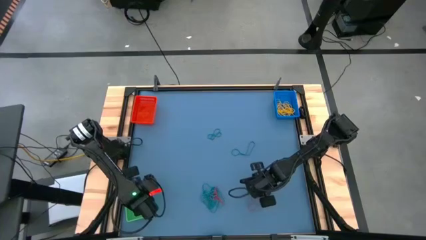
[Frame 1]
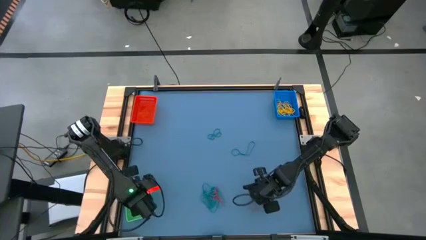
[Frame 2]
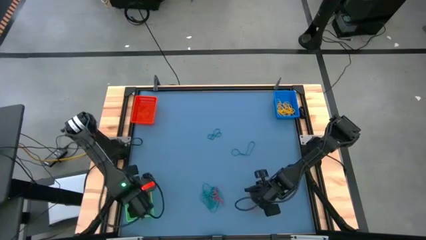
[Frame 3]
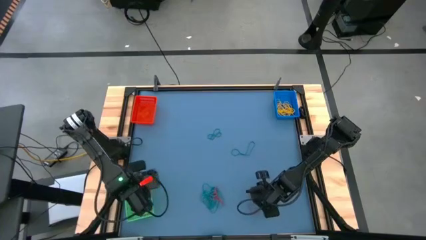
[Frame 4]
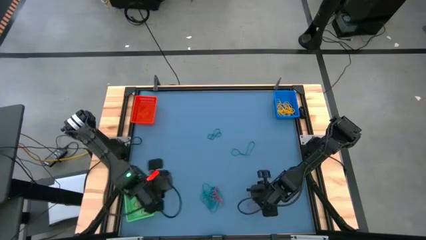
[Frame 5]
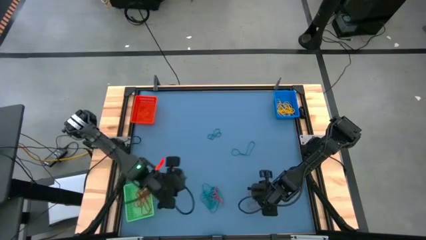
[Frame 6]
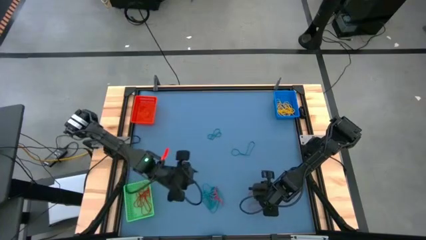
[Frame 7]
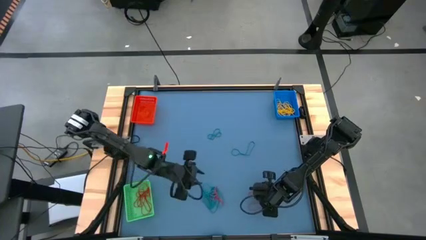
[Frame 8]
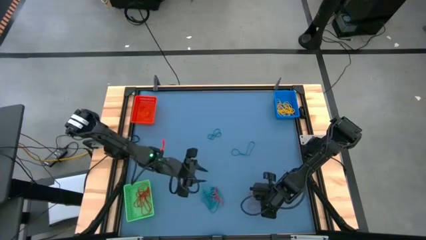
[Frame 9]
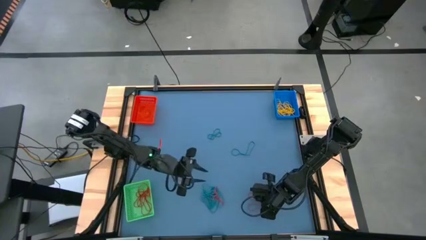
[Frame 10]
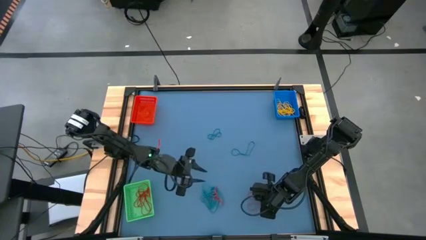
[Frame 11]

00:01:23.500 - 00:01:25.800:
Task: Sort rubber bands into baskets
Put the red rubber band into the green basket

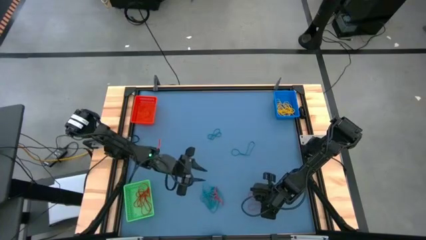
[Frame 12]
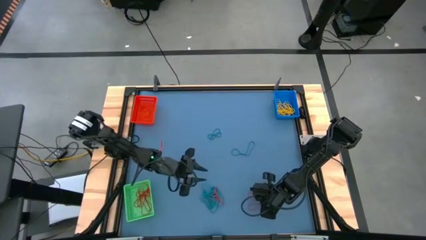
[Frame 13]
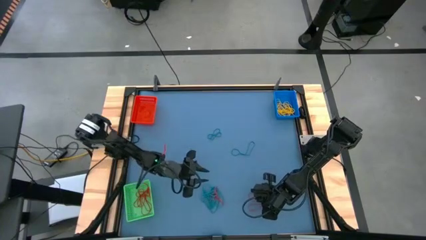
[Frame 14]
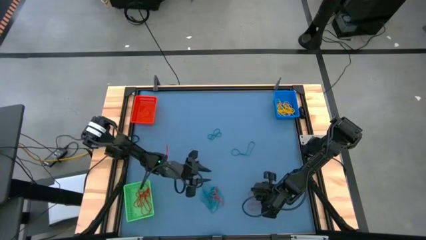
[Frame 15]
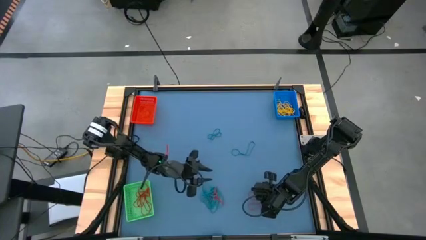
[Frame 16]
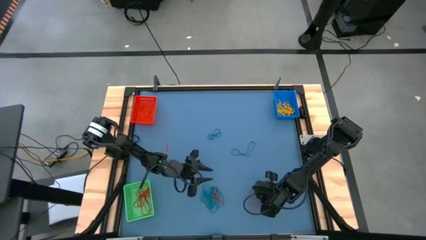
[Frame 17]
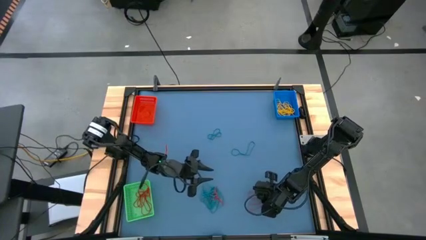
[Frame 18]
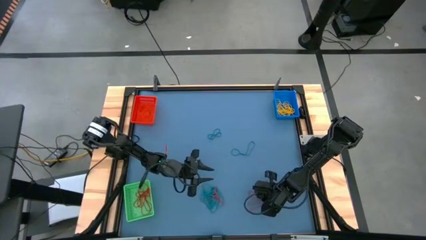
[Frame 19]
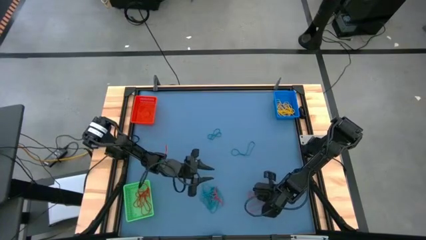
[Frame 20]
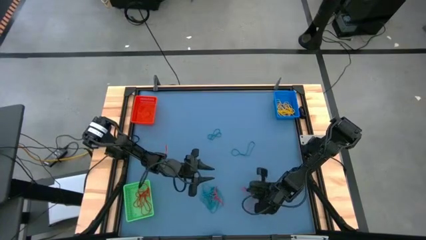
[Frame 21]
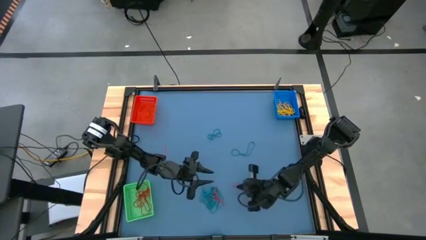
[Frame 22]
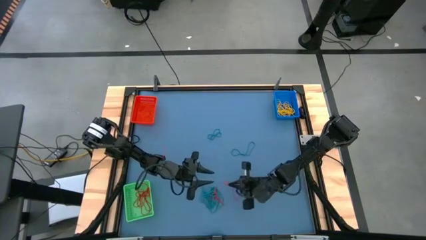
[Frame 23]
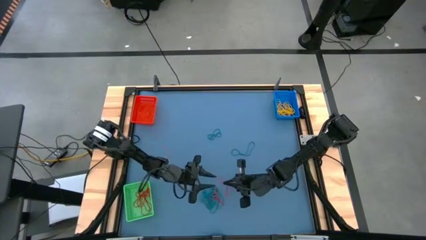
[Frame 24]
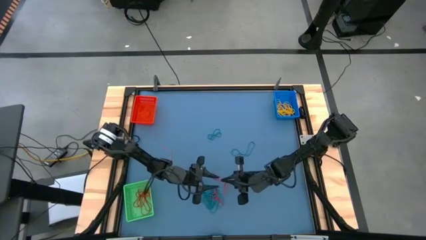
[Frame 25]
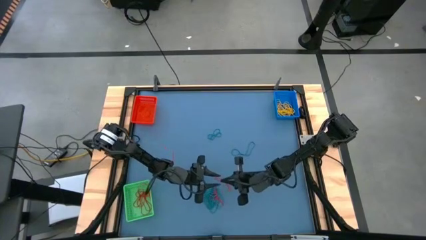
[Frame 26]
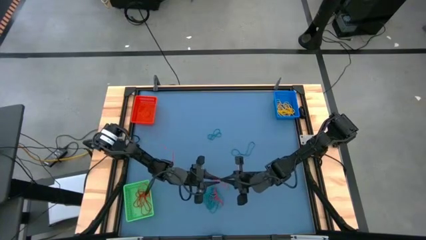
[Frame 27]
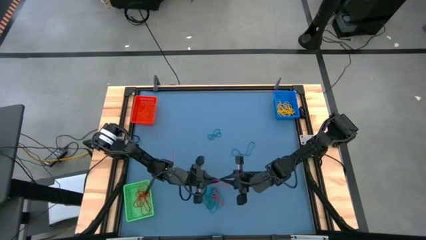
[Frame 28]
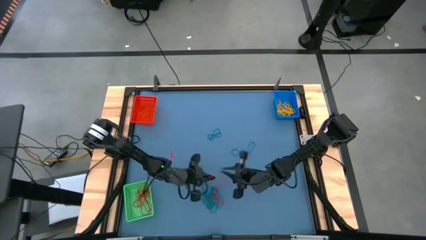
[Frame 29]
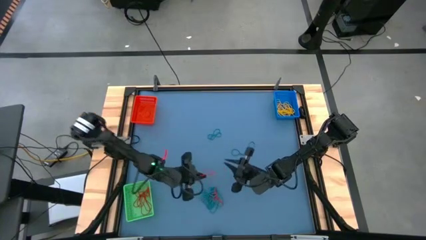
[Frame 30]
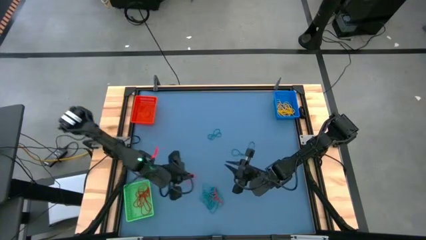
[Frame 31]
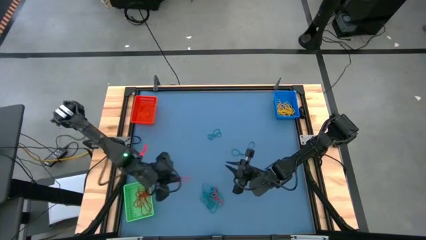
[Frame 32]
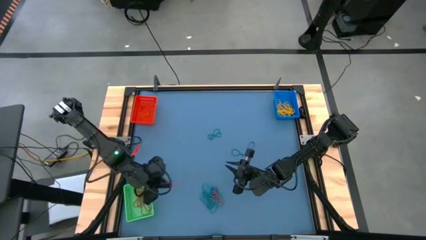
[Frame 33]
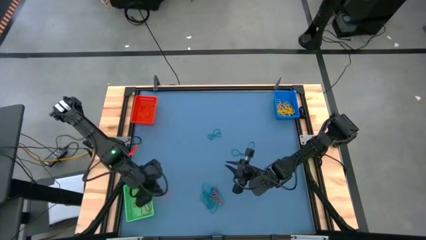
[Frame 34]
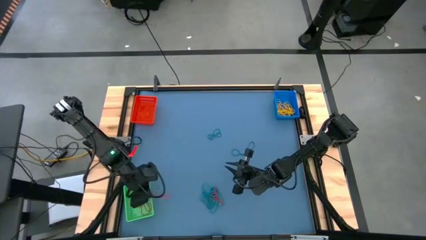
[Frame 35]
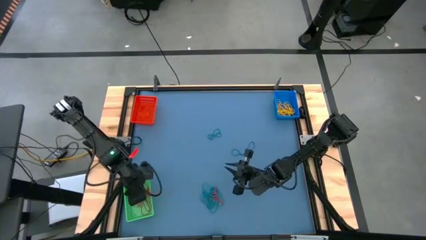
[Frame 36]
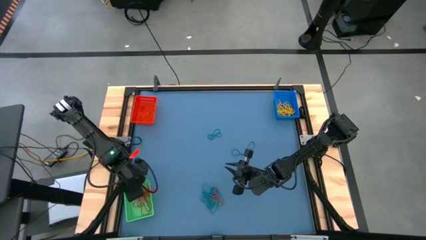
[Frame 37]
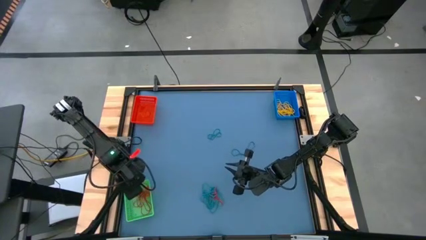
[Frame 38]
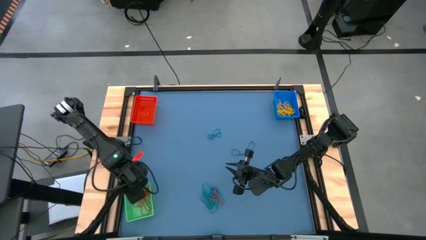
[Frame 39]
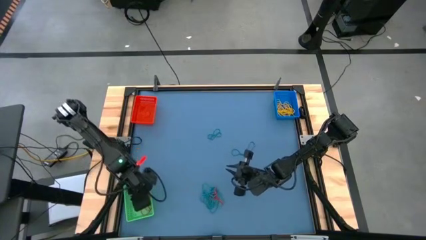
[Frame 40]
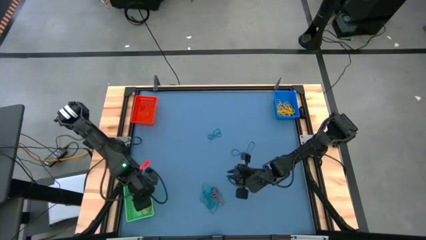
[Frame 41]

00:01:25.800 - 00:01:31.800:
Put the red rubber band into the green basket

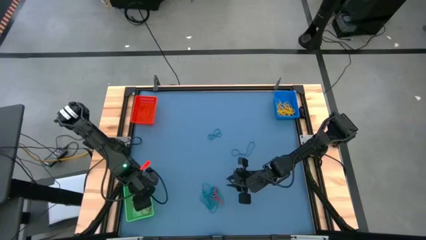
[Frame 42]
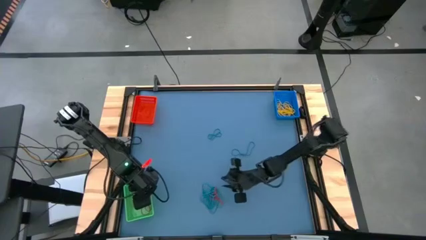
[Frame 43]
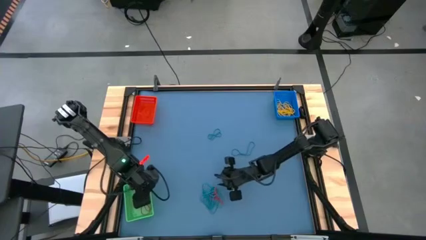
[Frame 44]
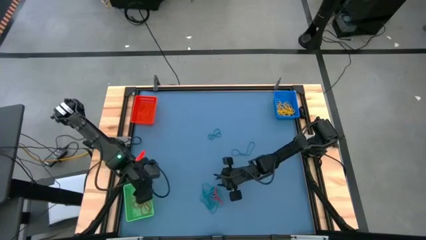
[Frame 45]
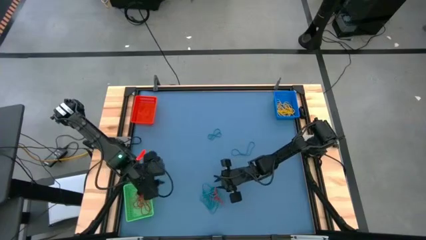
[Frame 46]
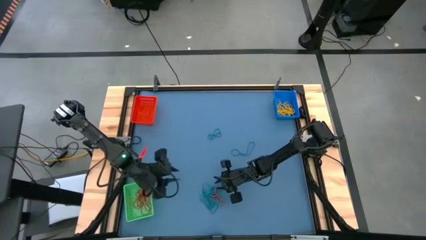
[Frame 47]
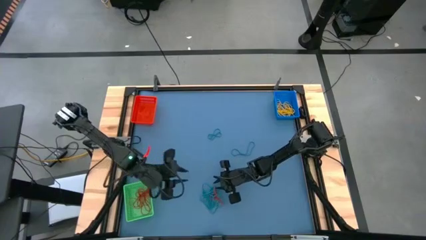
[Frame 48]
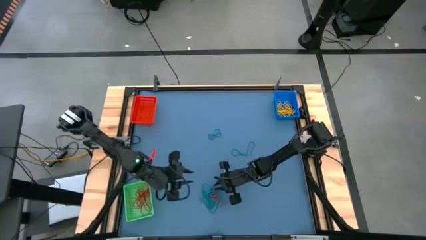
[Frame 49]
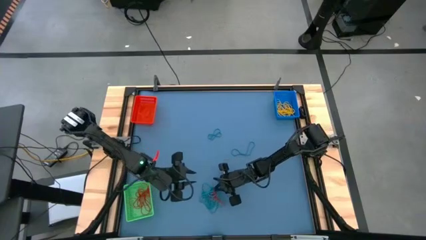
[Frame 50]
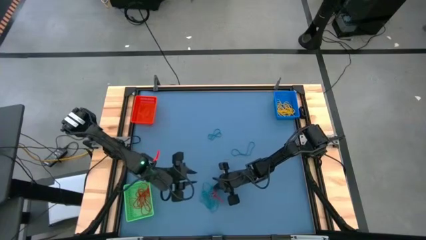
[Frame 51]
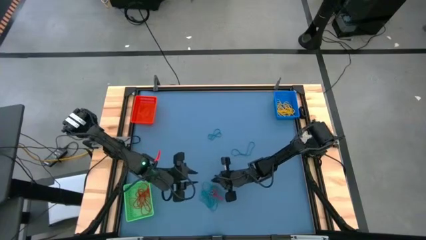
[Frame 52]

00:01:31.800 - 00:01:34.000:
Put the red rubber band into the green basket

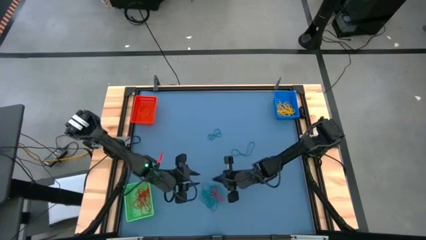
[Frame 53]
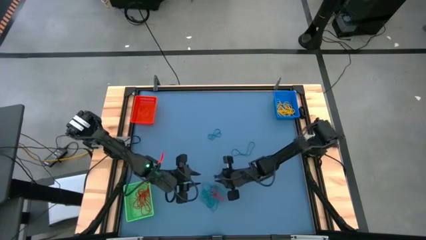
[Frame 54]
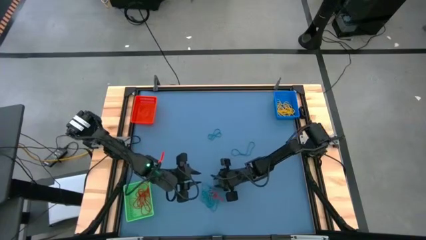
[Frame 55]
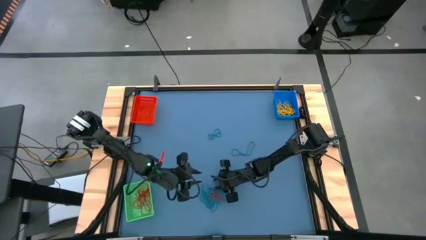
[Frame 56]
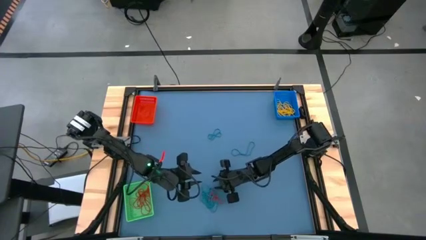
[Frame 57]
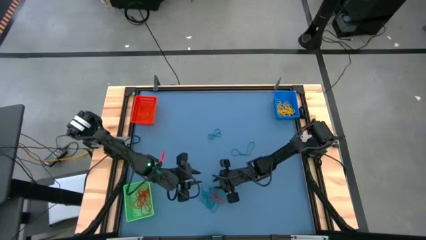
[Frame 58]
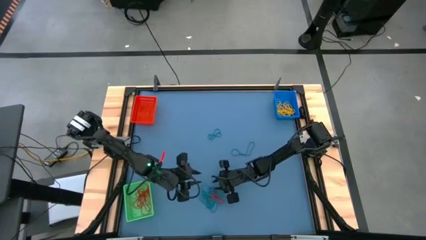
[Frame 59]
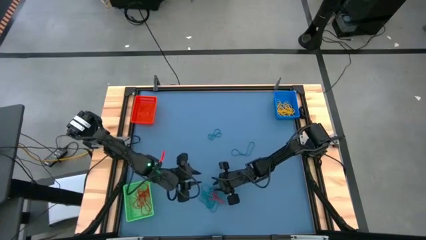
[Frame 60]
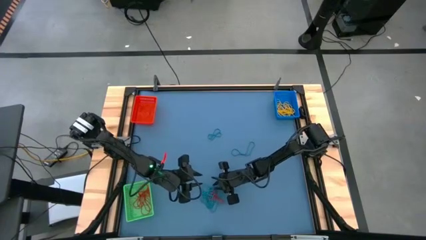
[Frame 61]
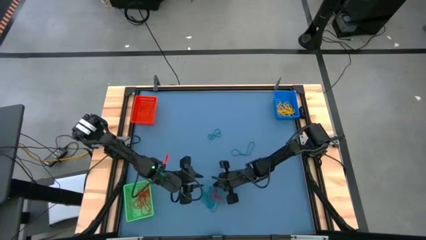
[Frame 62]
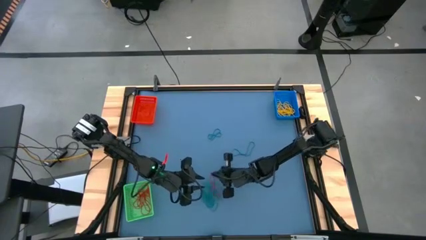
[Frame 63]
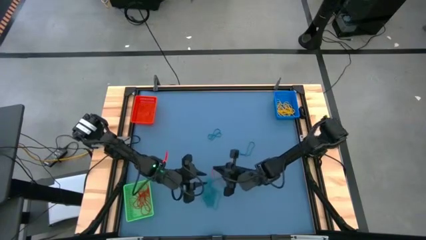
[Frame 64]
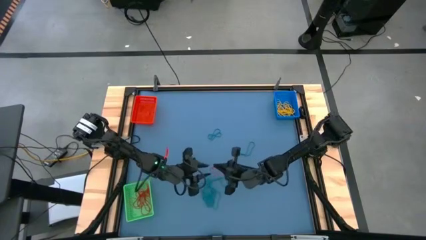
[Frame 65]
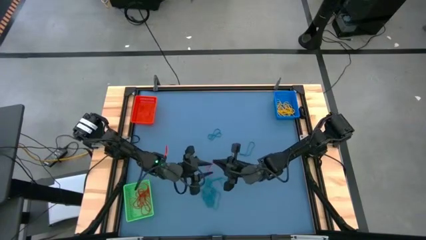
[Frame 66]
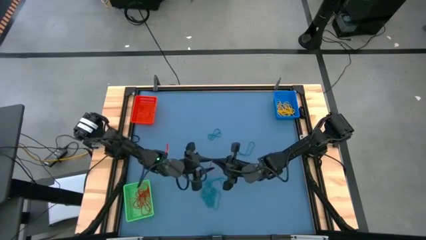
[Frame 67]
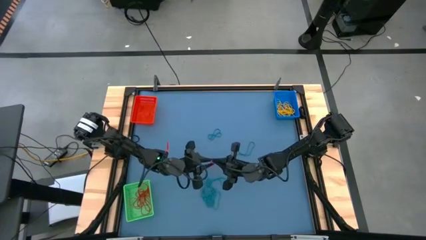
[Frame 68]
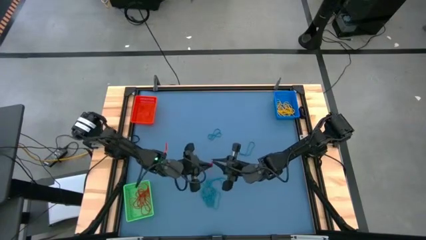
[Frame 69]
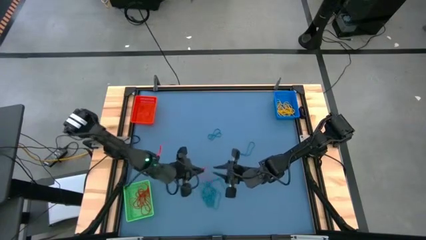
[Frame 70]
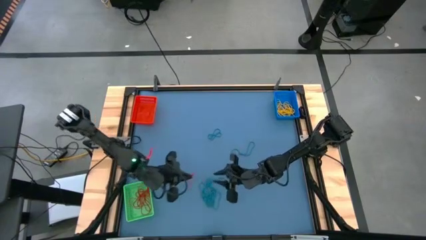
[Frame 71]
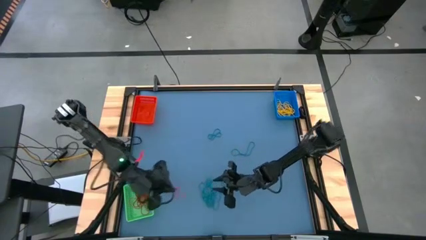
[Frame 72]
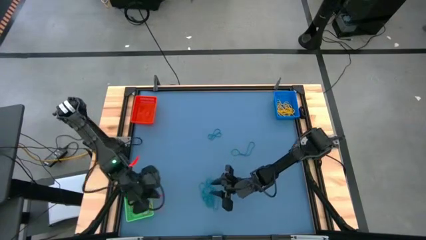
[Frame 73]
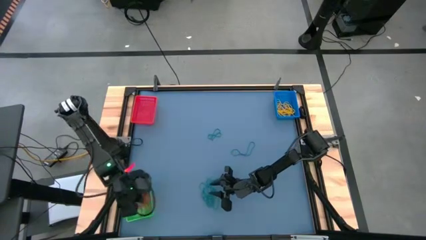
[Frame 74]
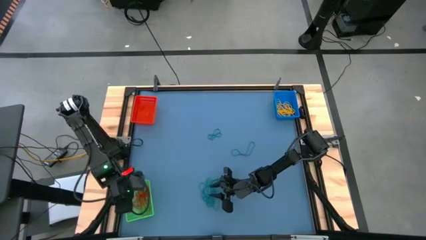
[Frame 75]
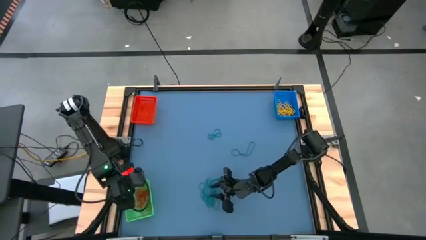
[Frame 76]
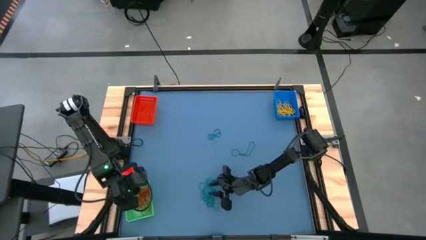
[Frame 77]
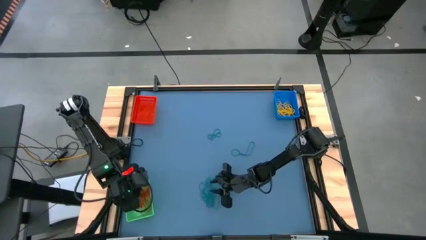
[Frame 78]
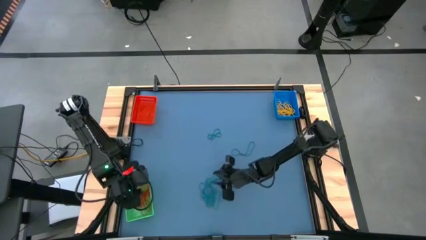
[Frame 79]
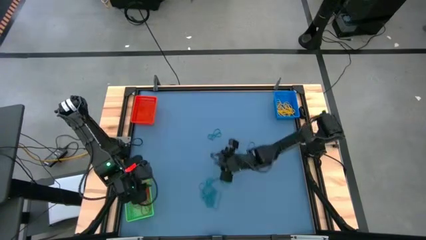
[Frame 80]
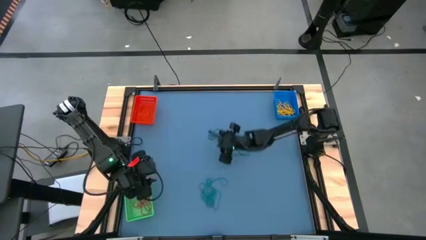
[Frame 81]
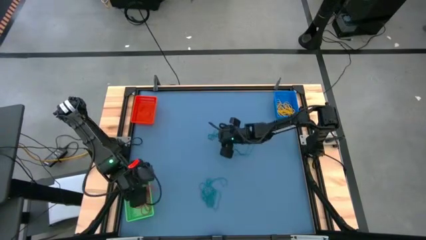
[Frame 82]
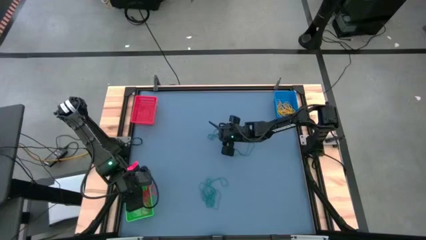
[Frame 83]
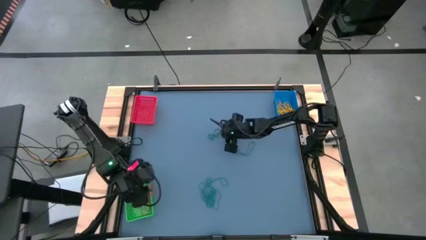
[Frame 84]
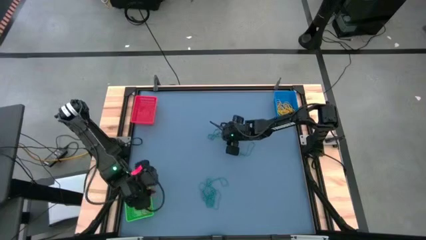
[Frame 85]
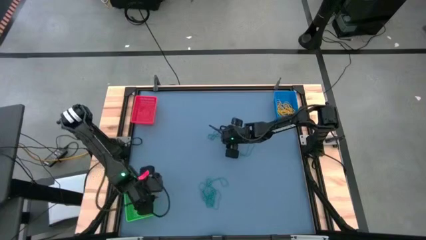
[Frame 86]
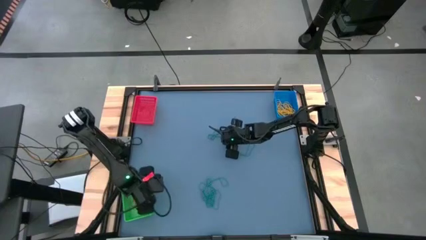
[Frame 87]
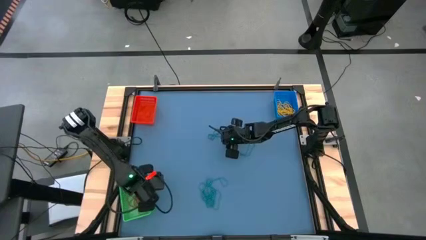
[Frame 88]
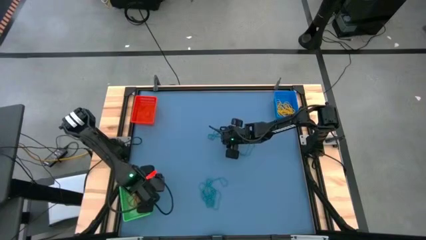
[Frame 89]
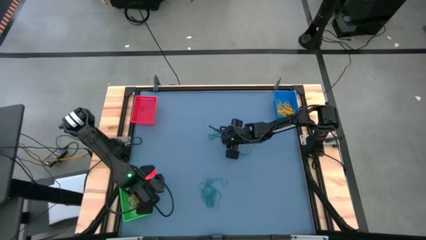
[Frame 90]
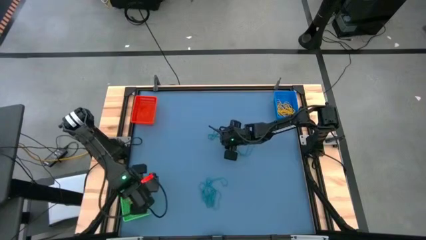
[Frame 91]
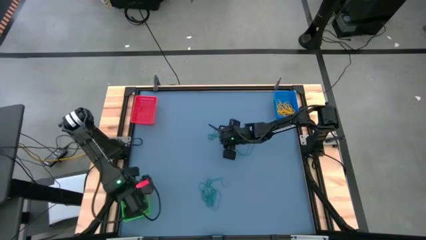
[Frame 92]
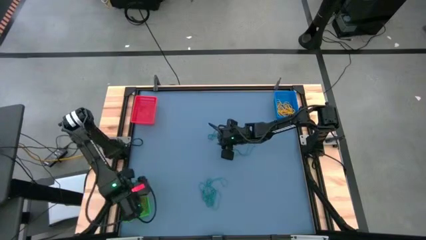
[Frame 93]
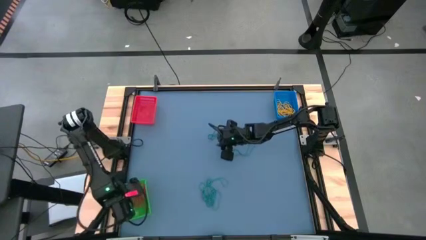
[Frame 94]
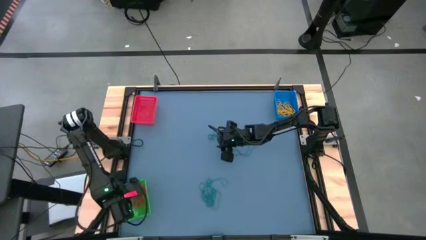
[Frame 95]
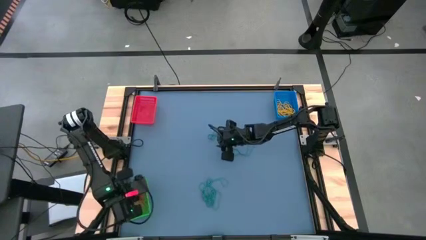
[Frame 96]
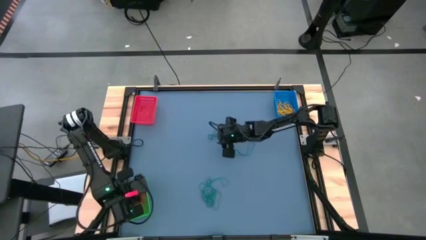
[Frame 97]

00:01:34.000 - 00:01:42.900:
Put the red rubber band into the green basket
